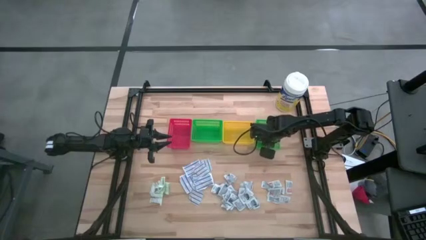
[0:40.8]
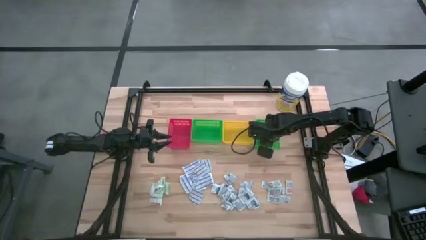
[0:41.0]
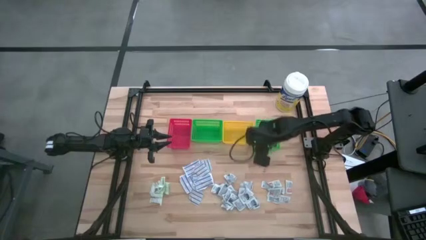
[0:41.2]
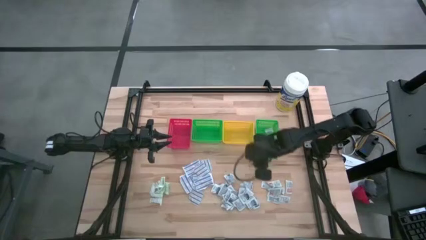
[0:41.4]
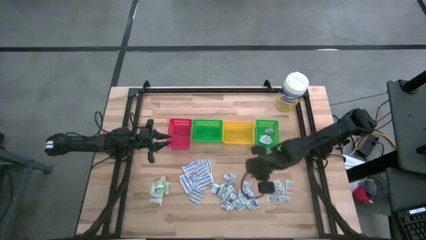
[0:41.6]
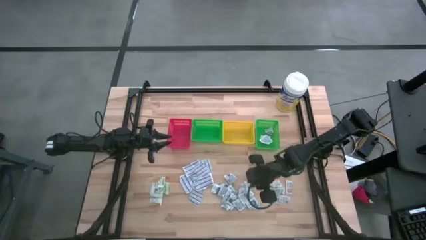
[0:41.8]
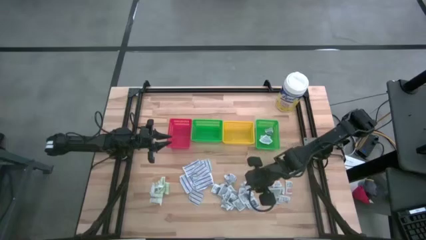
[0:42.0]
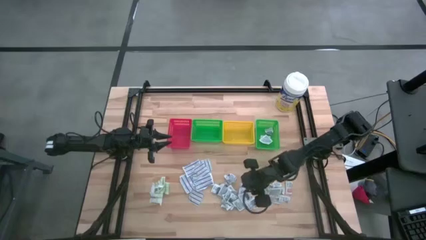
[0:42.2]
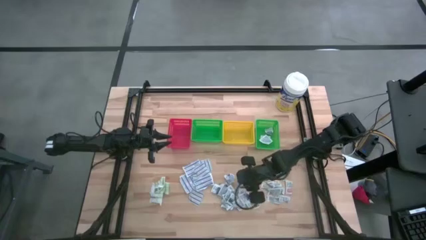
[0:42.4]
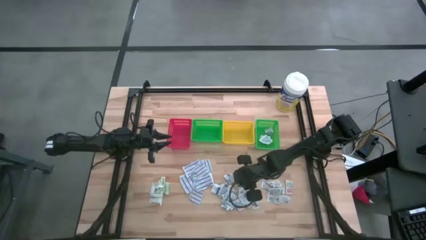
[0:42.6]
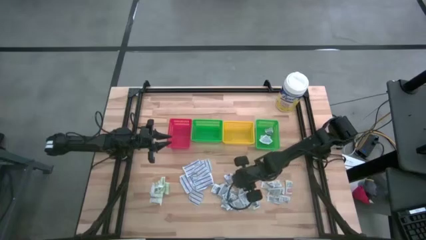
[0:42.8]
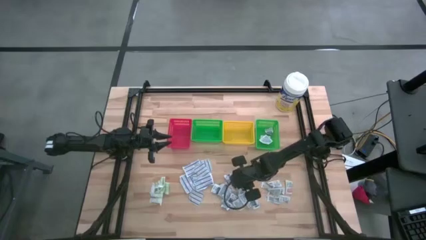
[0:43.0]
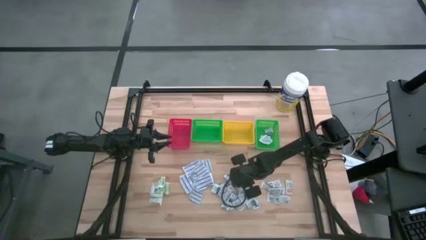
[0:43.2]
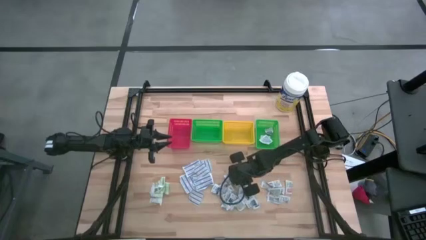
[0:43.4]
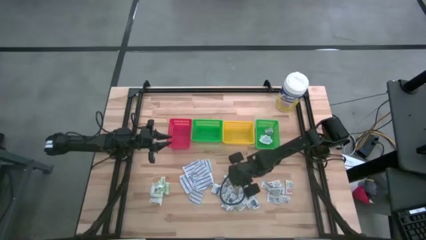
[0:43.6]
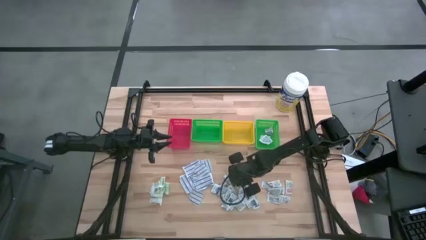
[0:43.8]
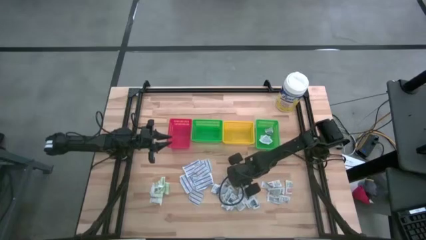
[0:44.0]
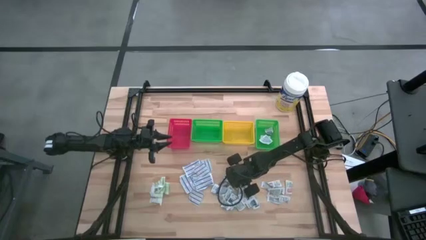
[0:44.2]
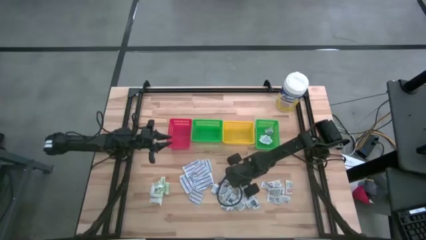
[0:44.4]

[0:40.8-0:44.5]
Task: Pick & Place First Aid Supplies
Put the blue alcohol pad into the right green bin

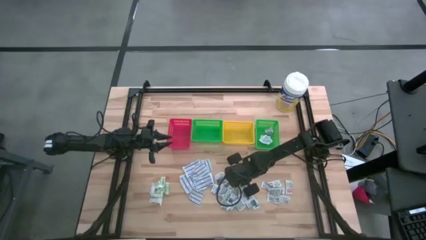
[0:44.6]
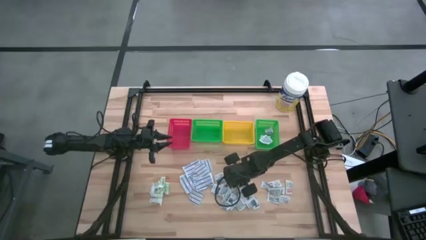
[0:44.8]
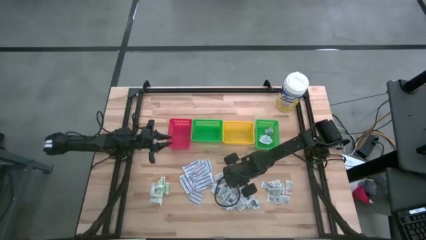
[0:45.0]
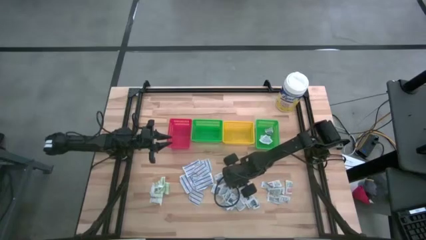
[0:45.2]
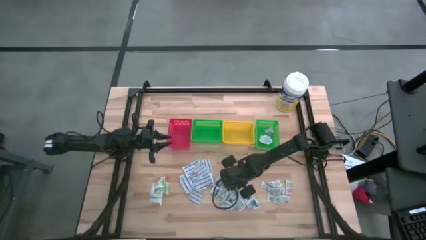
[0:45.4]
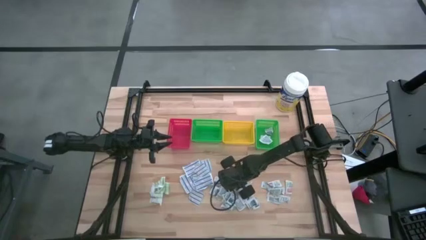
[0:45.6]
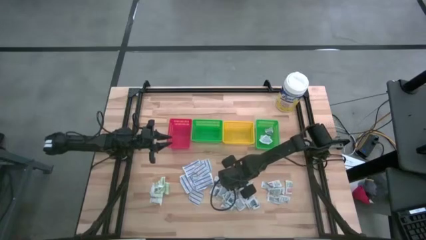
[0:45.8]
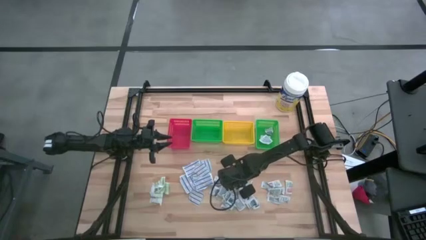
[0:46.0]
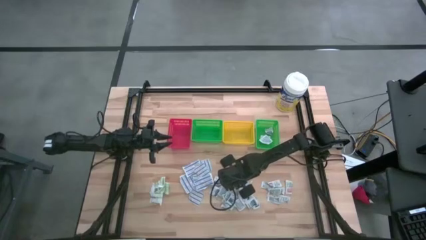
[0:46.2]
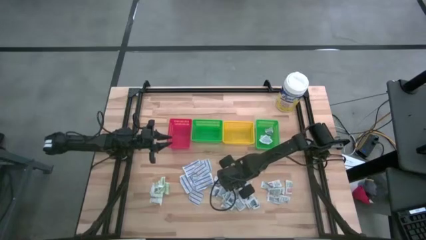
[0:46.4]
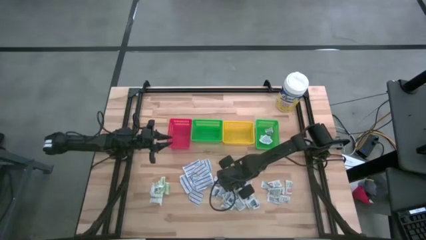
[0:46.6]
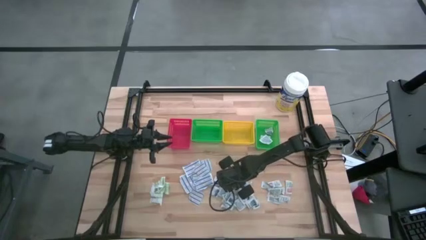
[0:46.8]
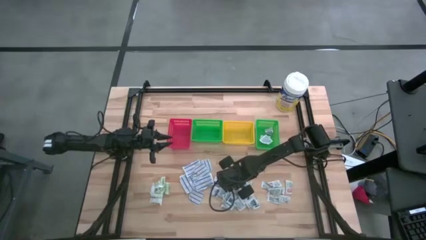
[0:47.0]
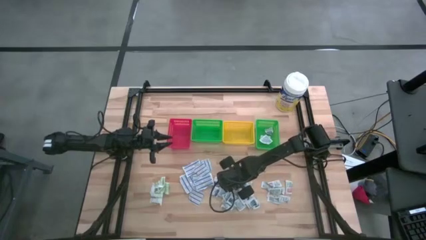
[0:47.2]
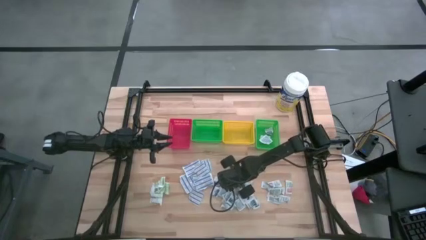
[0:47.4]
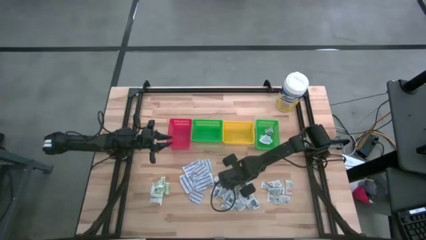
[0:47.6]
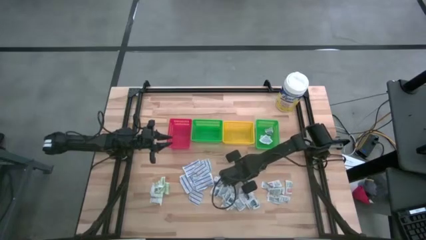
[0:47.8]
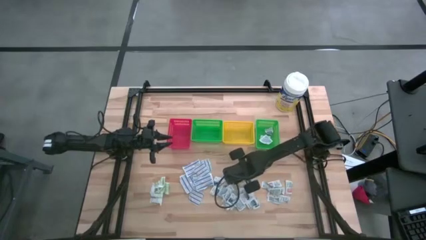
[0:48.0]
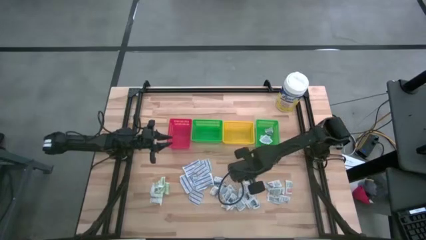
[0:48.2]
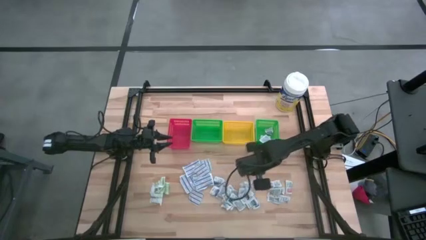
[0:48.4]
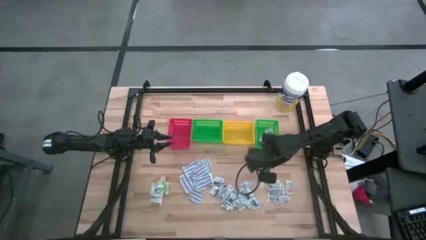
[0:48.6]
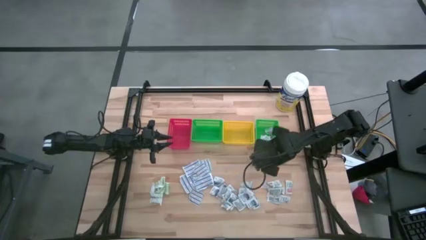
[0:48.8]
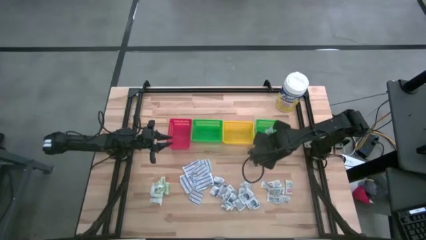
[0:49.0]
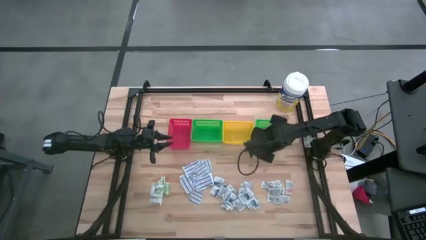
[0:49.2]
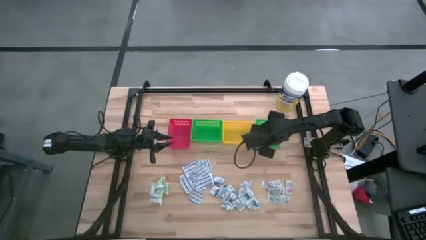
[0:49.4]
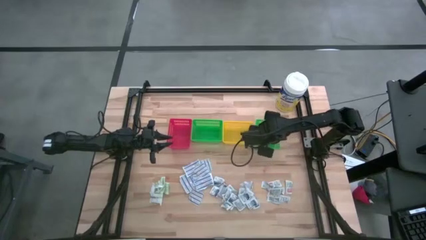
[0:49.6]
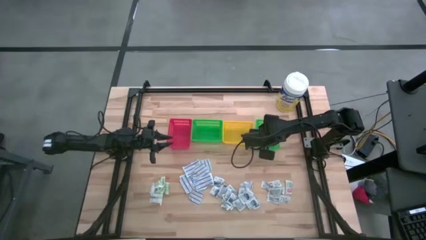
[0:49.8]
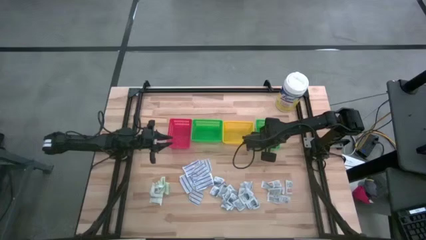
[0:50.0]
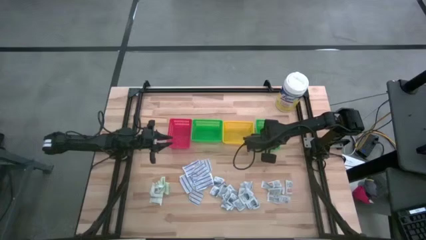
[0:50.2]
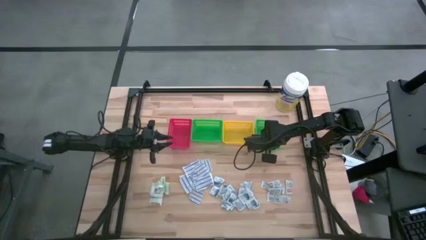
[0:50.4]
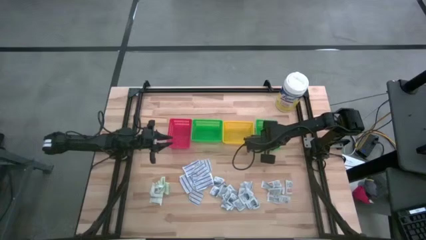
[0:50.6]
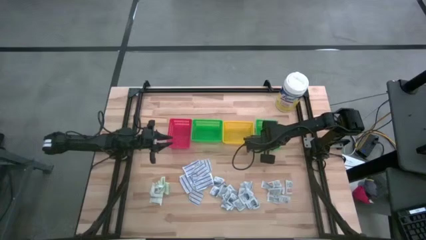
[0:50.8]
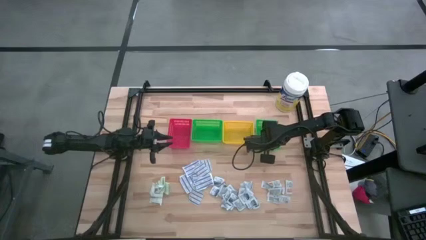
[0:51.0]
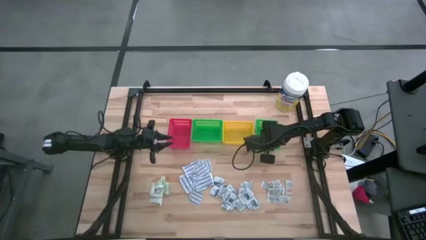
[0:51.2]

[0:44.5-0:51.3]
Put the blue alcohol pad into the right green bin

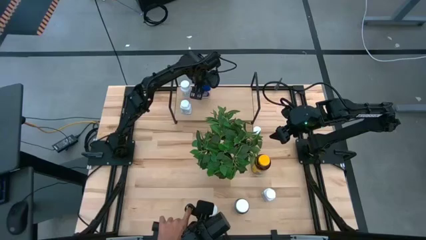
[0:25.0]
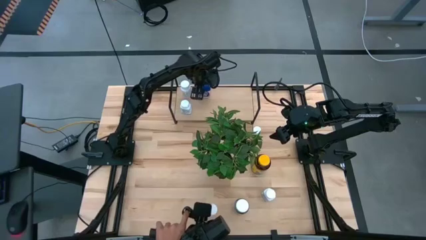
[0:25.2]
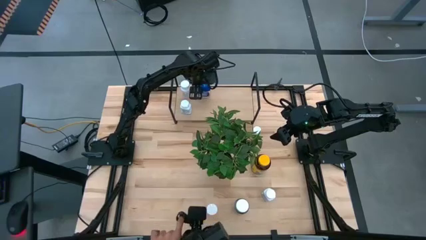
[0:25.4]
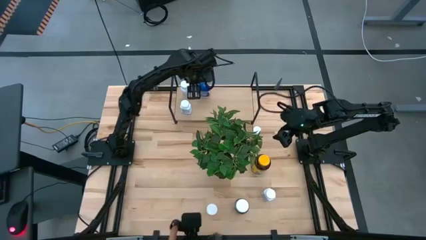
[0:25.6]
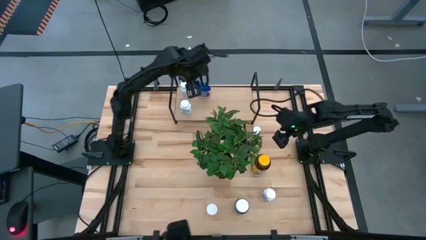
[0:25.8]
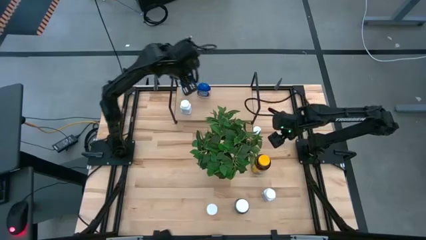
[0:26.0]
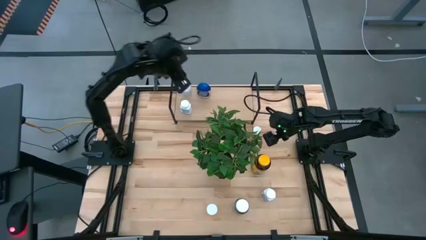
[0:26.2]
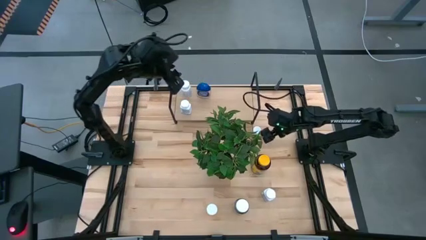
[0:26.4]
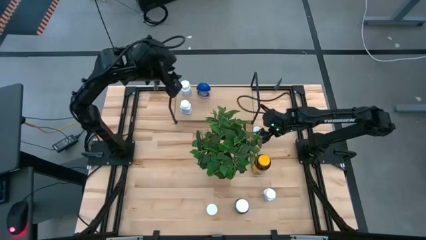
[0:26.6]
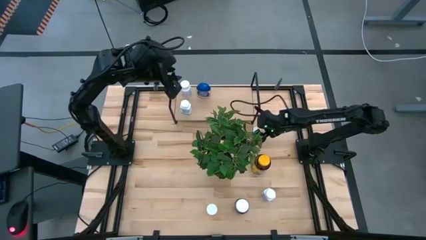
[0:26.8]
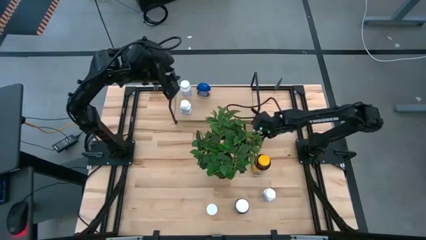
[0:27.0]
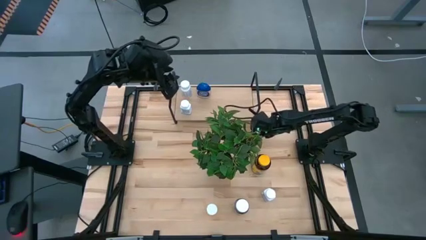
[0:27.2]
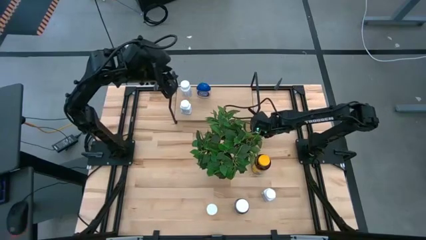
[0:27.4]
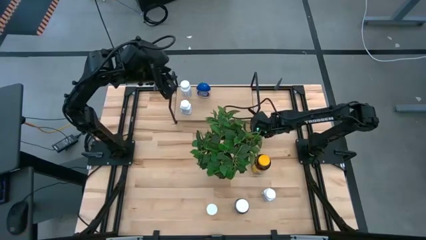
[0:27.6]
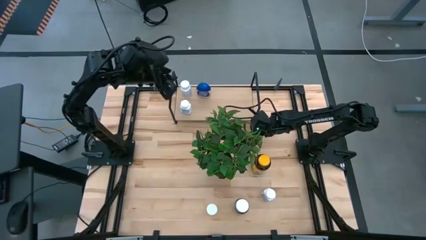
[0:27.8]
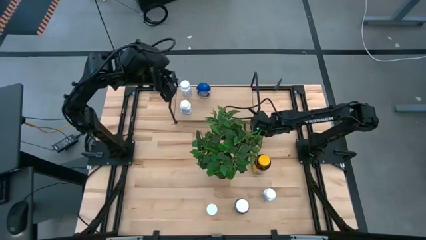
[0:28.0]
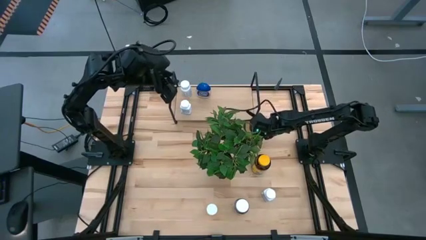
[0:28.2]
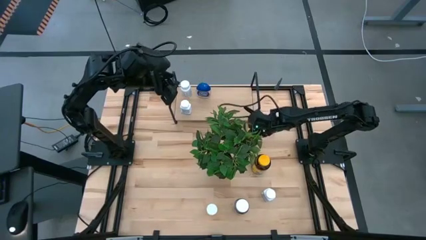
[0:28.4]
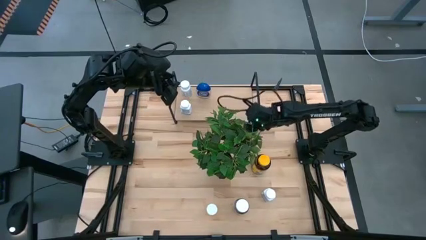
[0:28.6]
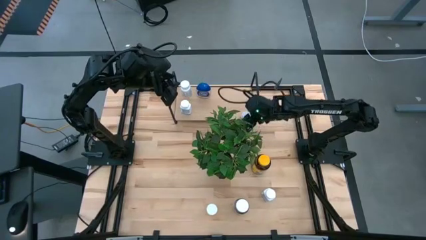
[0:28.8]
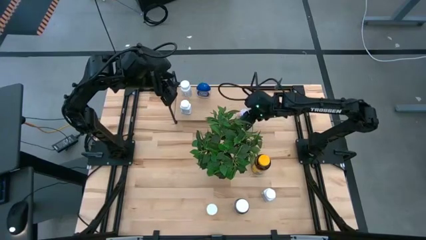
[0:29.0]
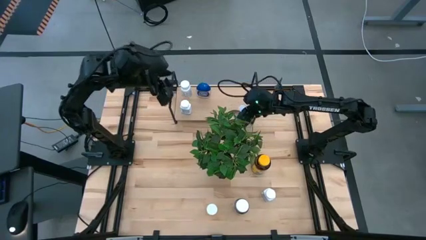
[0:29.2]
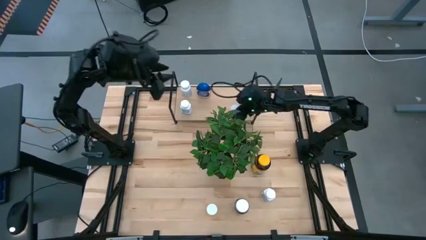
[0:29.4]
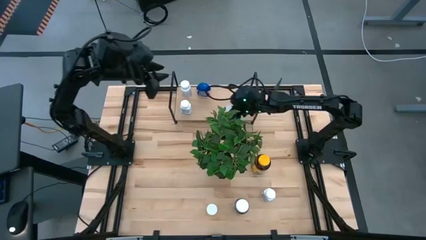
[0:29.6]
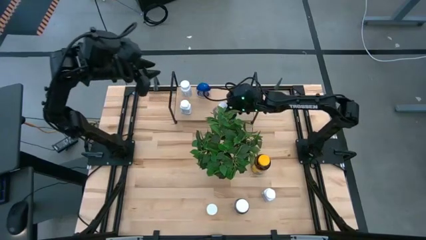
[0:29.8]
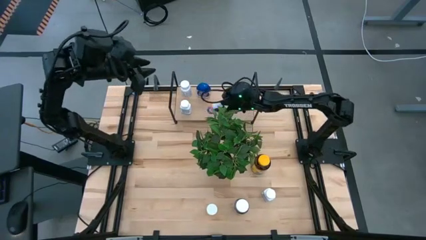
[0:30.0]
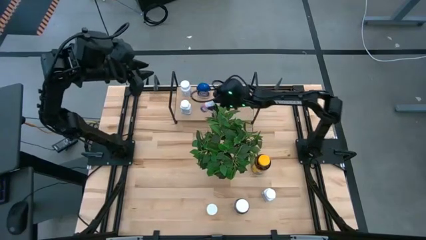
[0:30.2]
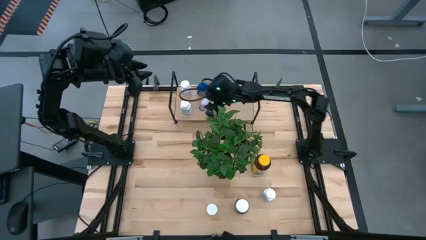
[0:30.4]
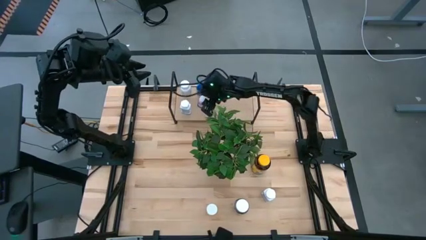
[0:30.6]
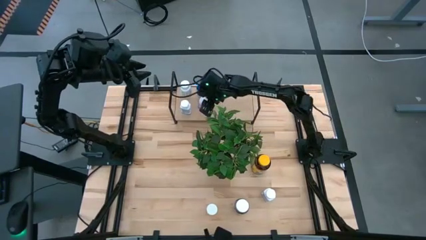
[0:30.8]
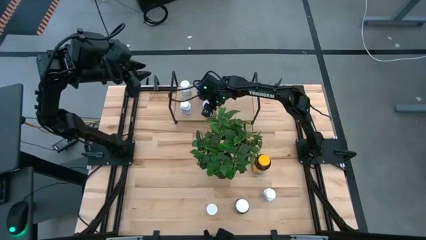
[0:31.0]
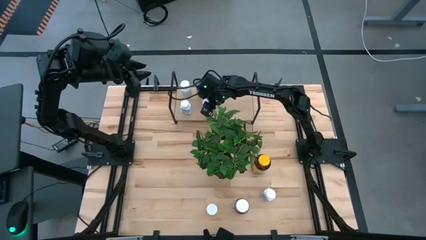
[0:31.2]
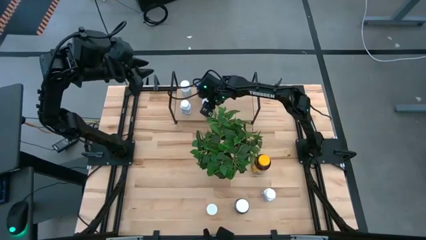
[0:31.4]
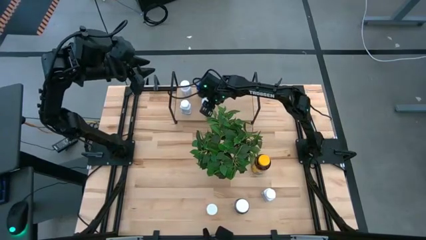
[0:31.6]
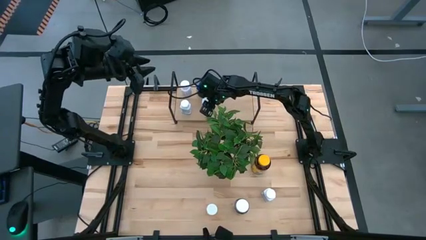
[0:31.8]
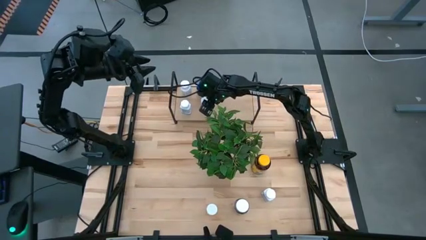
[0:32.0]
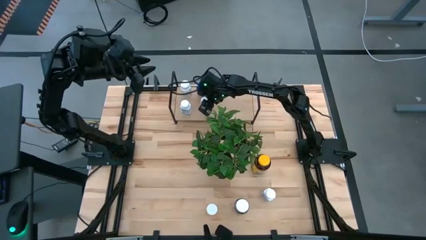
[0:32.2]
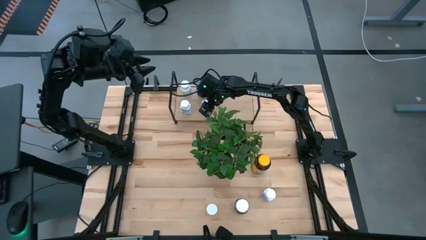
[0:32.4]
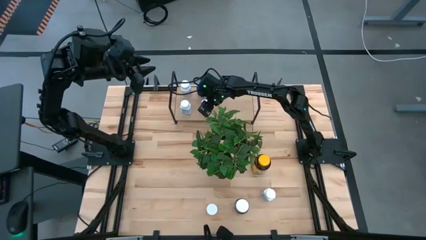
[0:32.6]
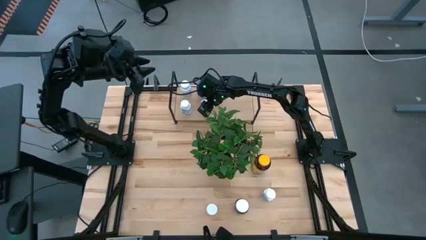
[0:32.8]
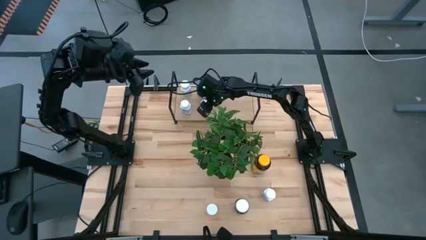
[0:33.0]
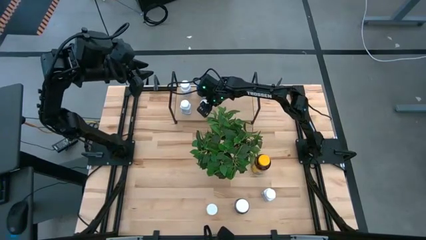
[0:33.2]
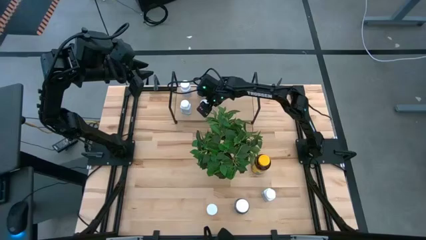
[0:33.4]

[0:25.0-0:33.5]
Task: Pick and place medicine bottles onto shelf by color
Put the pink pill bottle on the shelf
